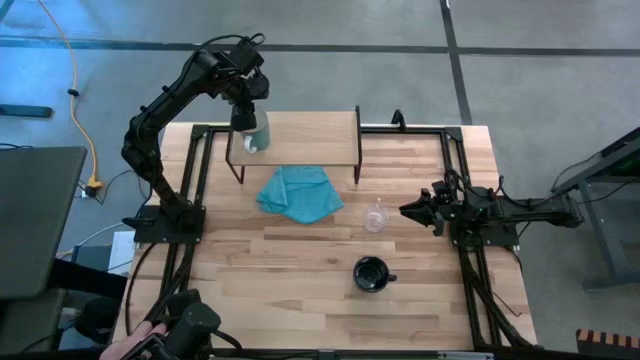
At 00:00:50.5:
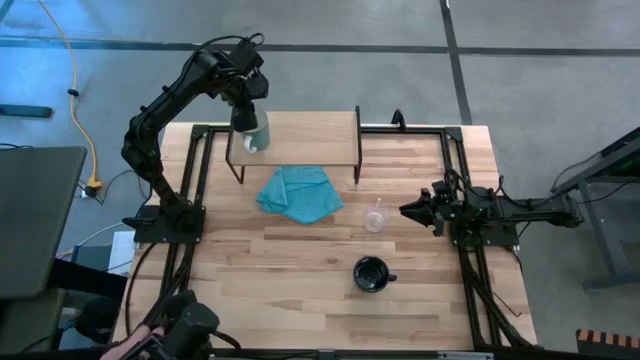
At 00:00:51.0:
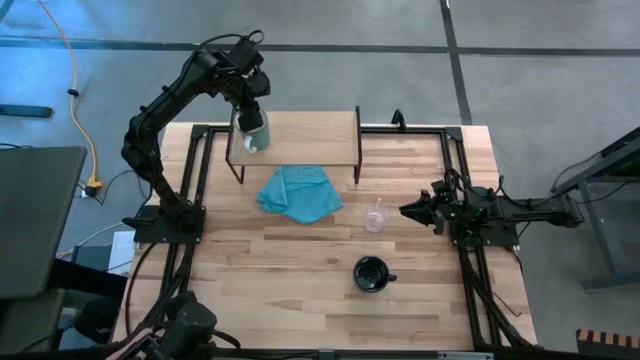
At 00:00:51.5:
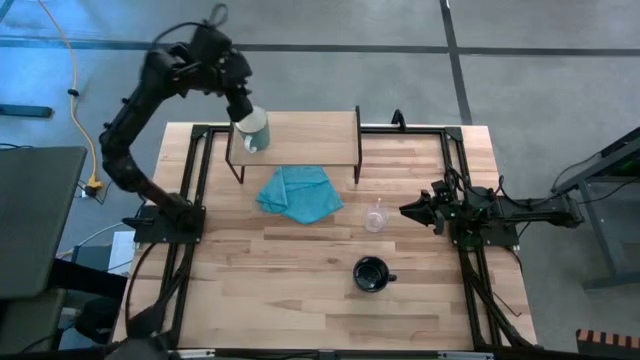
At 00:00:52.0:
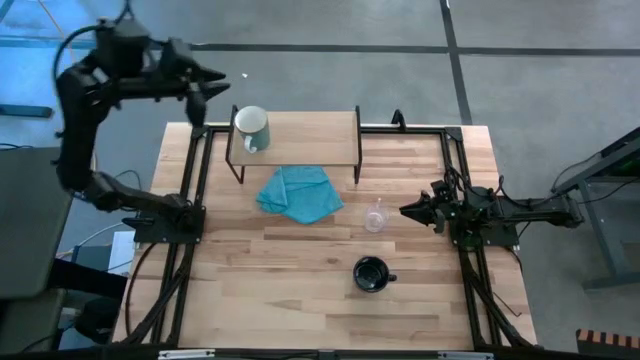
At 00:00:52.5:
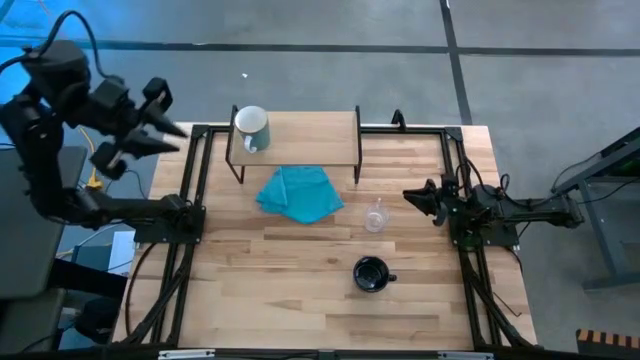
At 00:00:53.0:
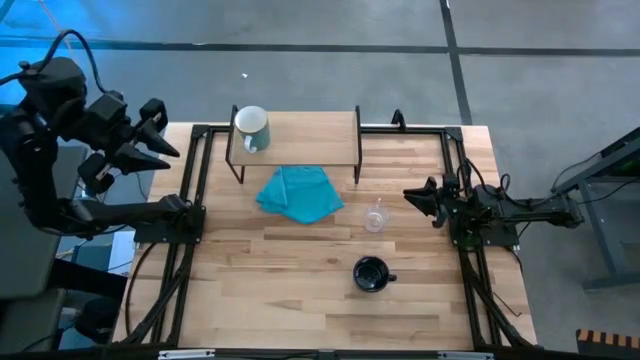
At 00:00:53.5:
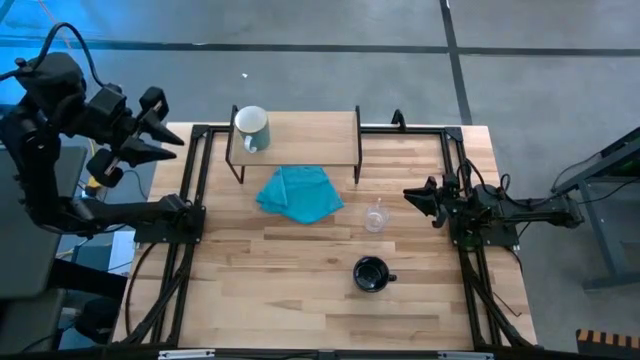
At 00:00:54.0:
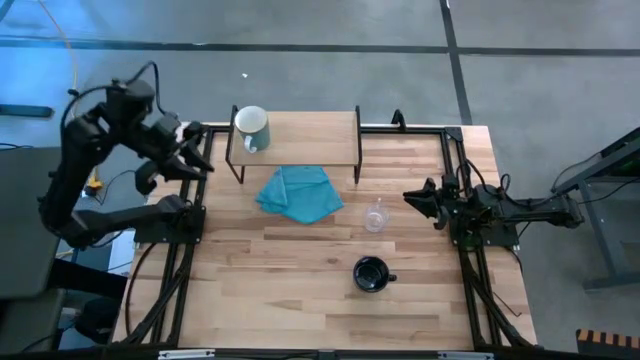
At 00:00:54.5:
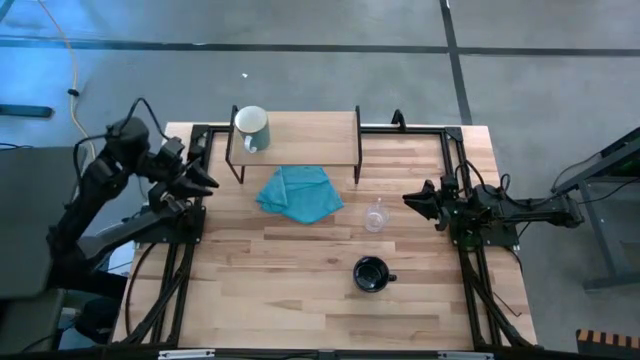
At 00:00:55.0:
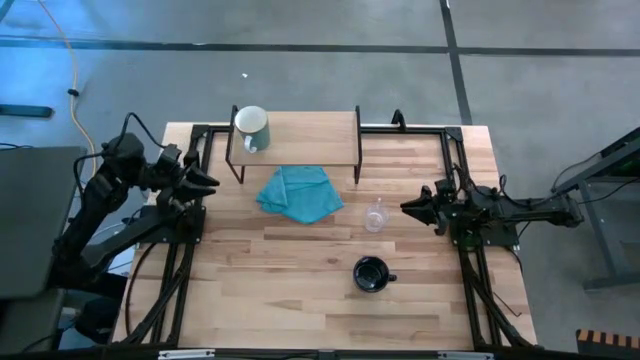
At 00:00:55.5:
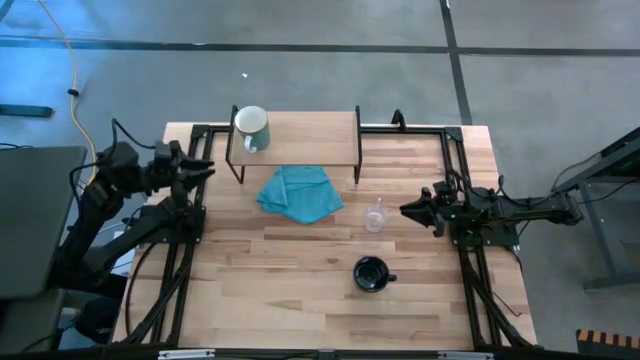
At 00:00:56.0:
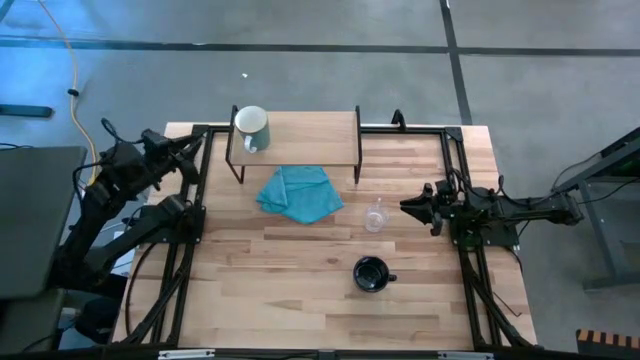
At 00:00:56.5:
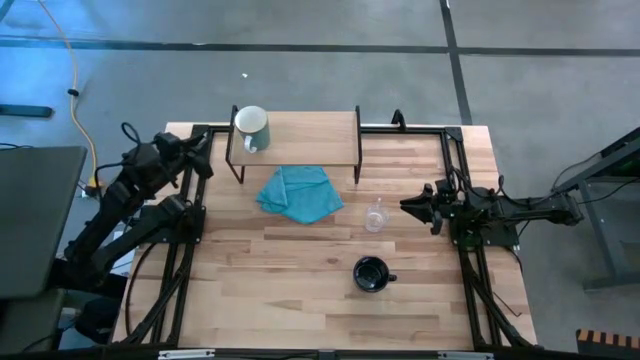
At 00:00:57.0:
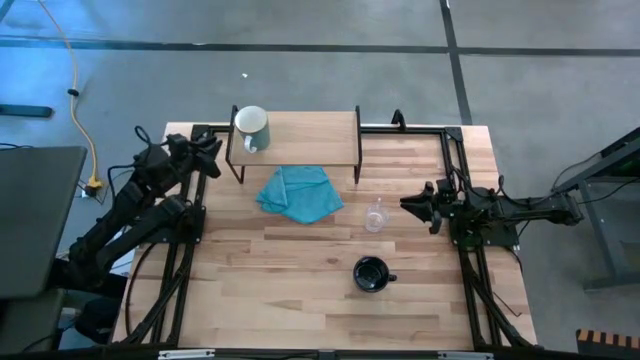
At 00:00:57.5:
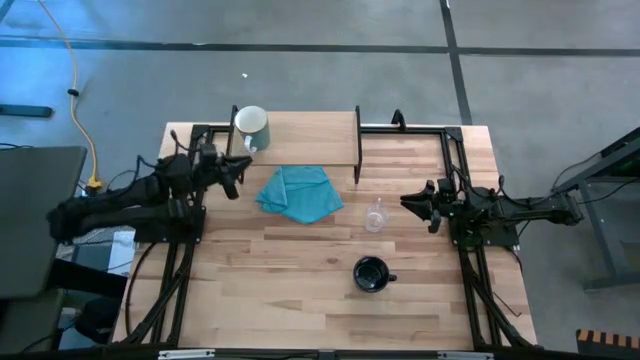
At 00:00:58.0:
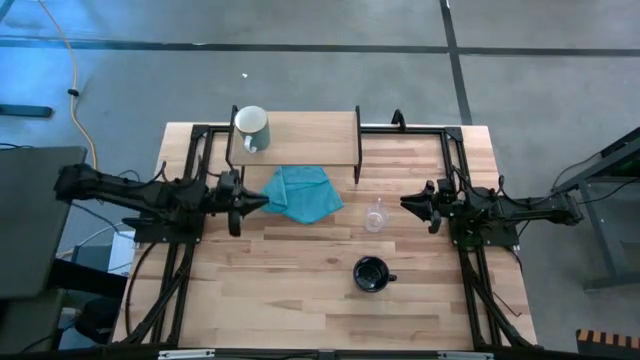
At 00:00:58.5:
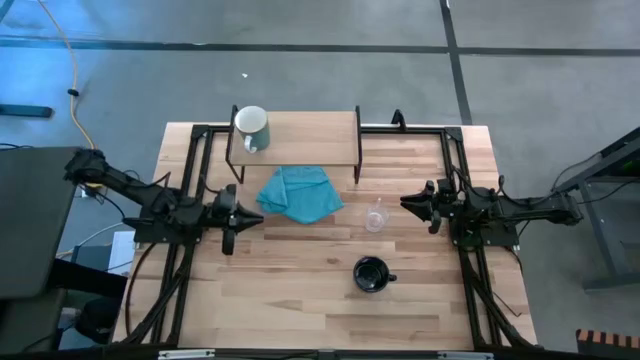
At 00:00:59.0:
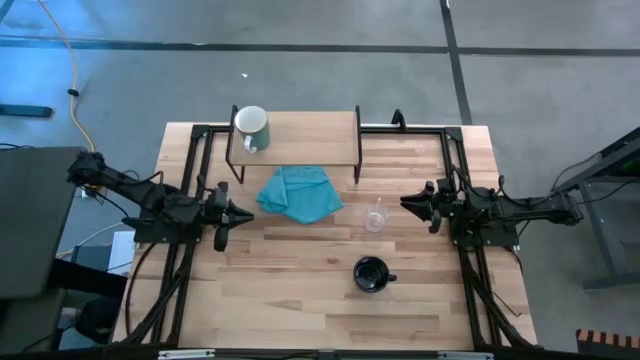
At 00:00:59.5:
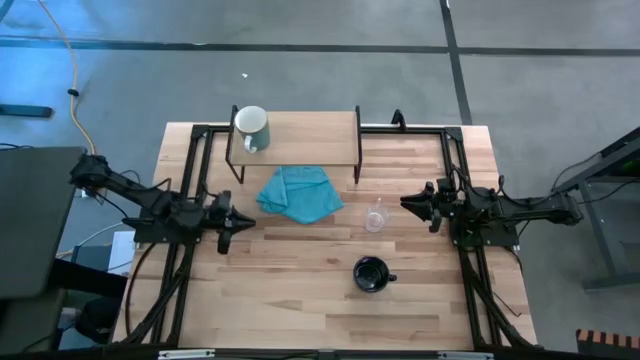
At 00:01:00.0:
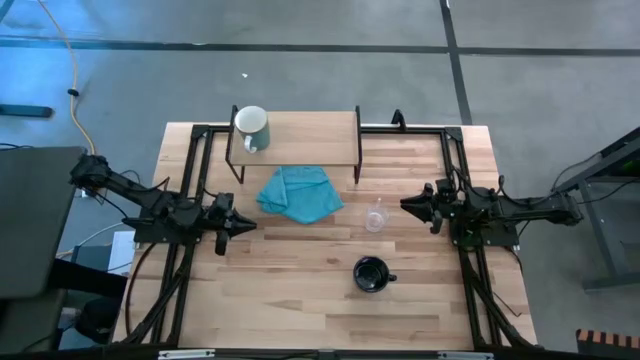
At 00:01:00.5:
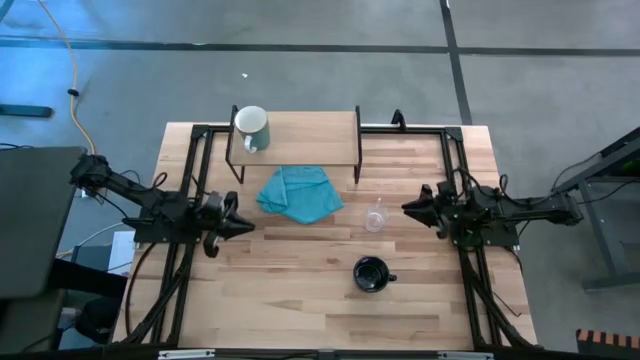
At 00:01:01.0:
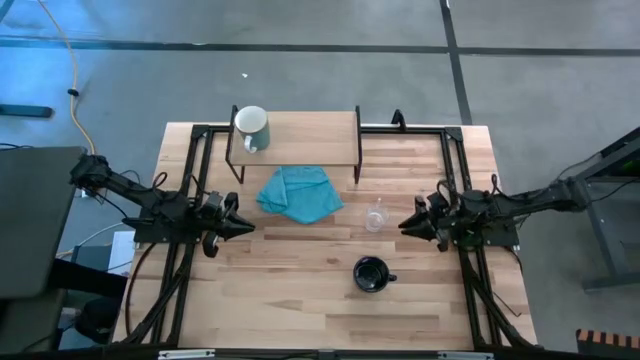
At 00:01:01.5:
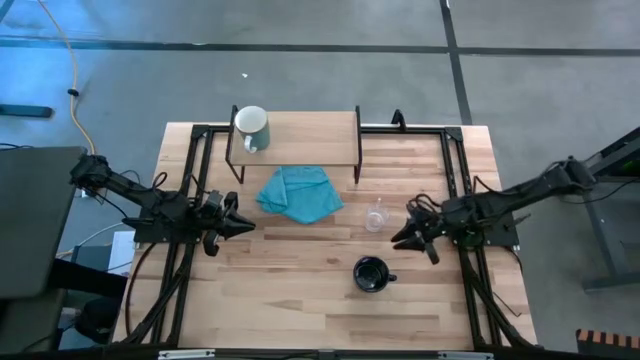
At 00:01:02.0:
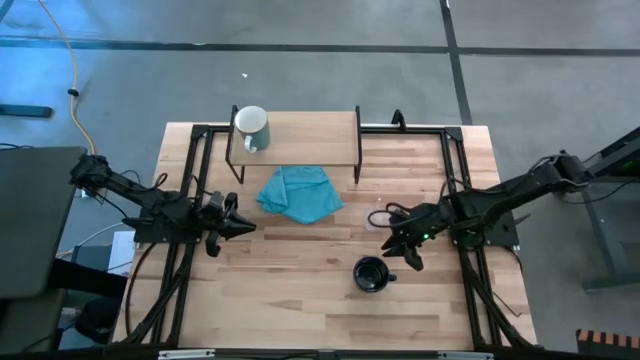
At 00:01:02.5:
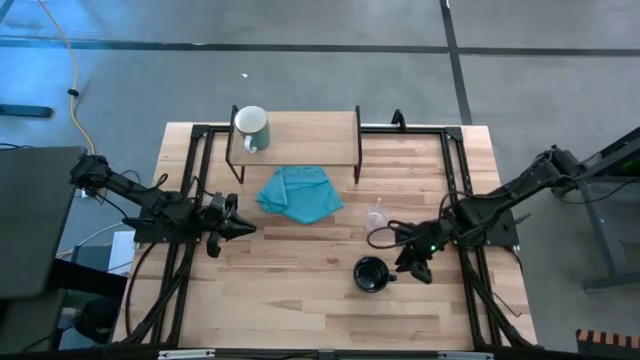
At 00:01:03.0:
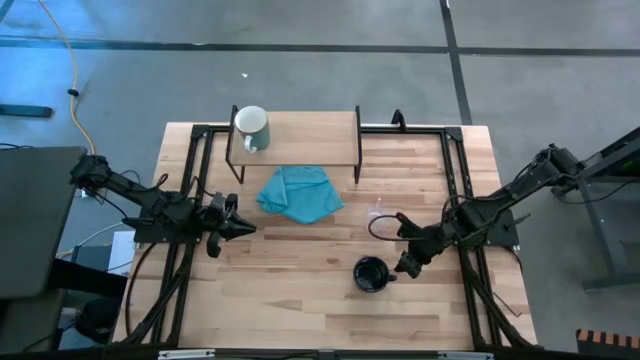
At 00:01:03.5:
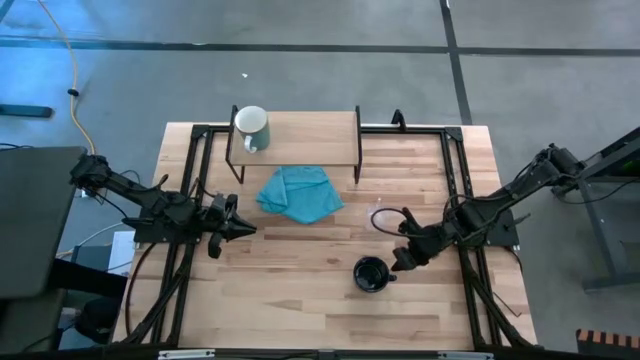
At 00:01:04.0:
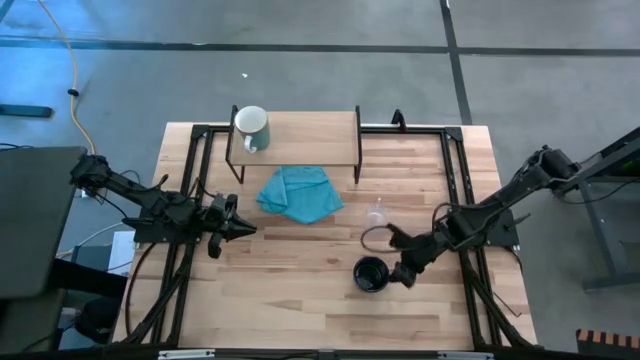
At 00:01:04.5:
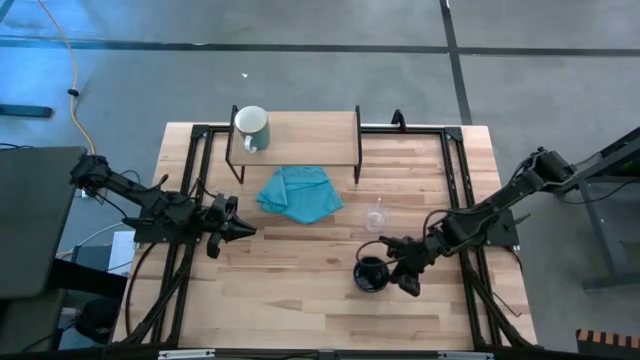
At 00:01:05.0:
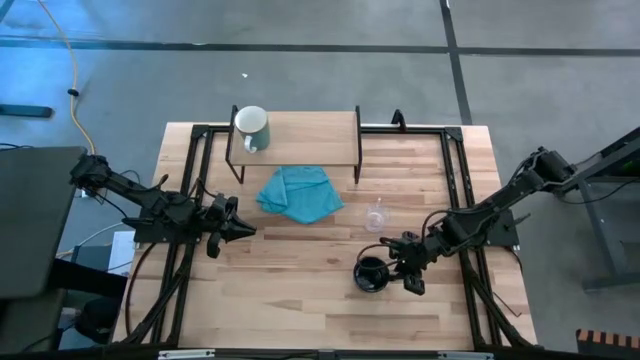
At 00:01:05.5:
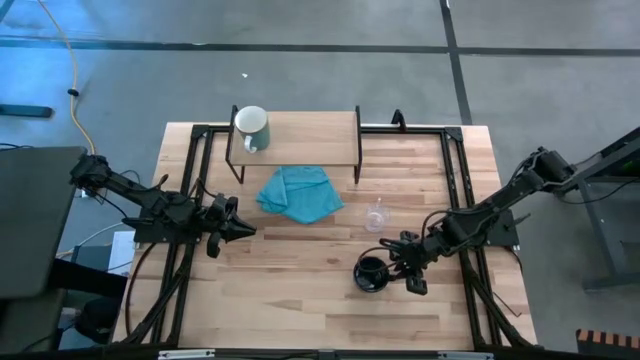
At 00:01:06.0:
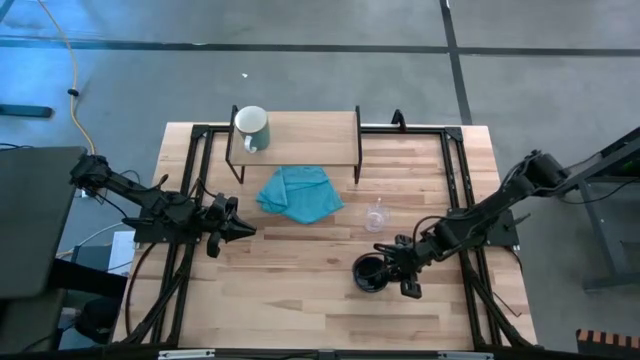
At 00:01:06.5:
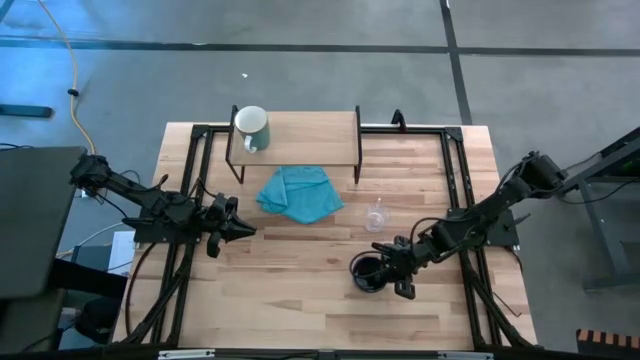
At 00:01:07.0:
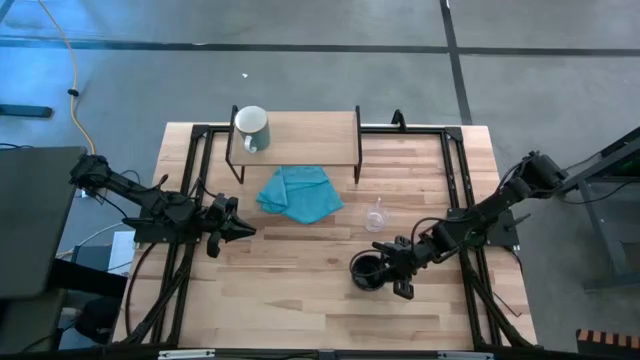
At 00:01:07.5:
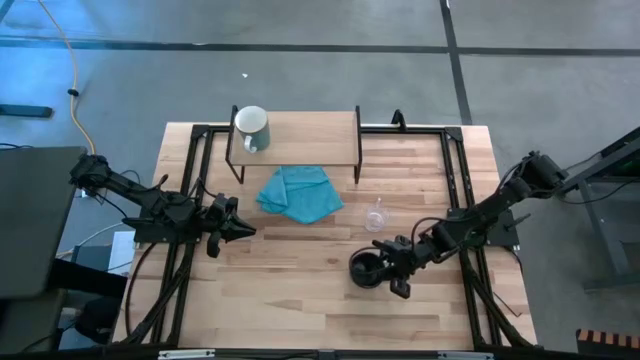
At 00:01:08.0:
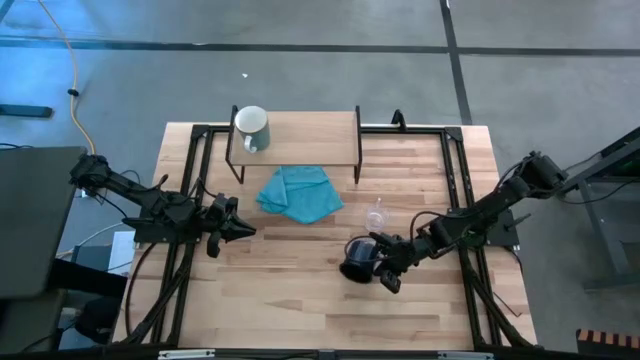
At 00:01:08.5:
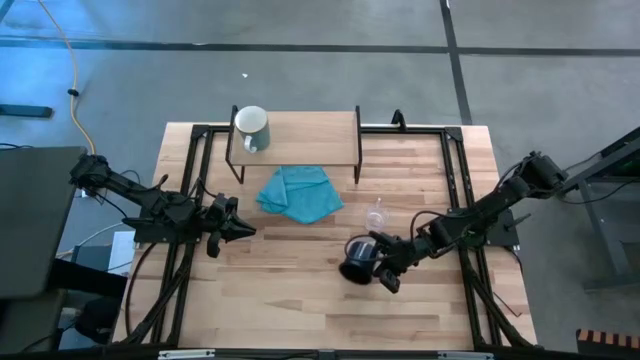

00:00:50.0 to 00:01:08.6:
Task: Stack small to large cups/mugs on shelf
Put the blue mug on the shelf

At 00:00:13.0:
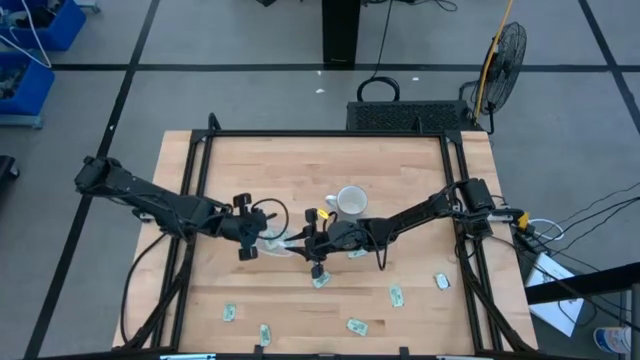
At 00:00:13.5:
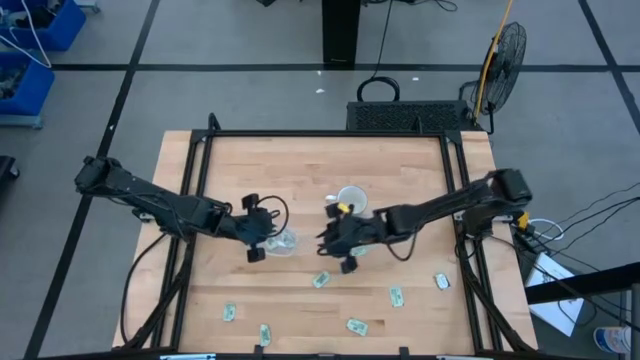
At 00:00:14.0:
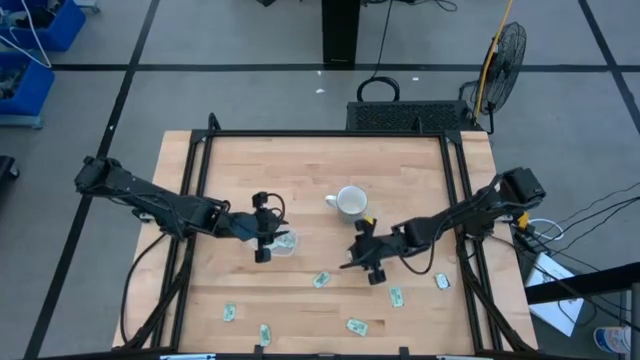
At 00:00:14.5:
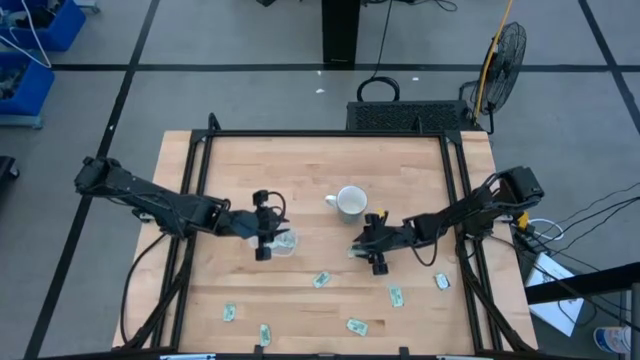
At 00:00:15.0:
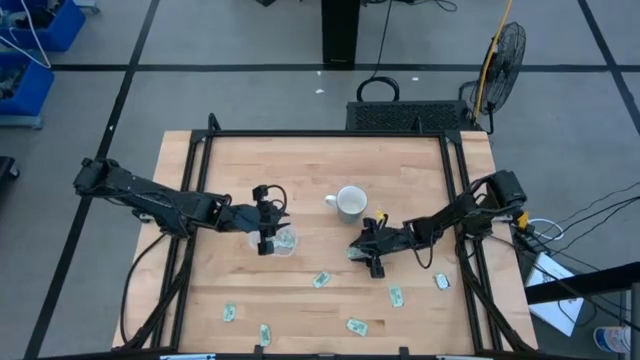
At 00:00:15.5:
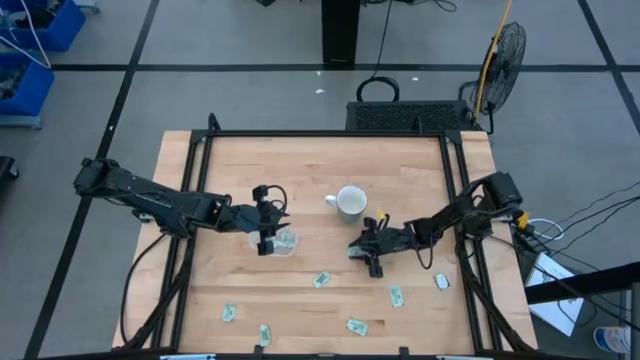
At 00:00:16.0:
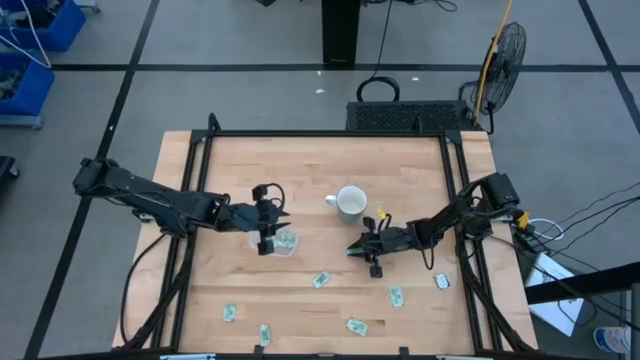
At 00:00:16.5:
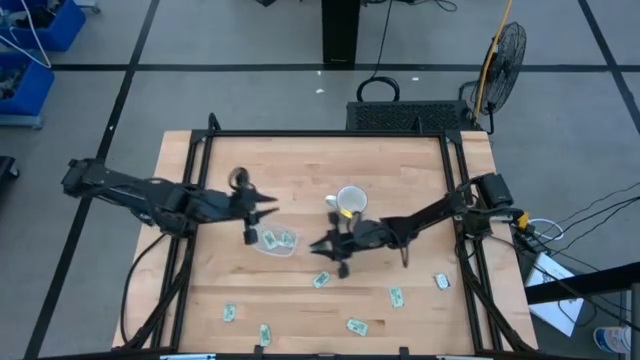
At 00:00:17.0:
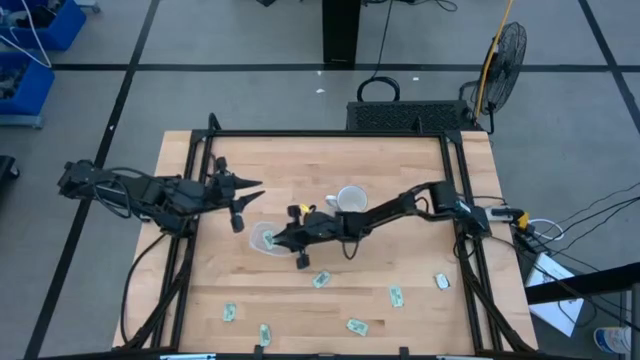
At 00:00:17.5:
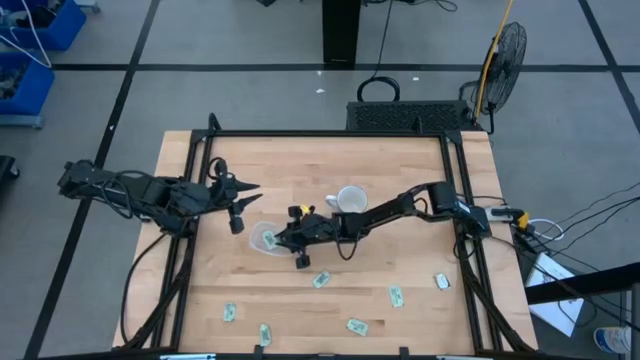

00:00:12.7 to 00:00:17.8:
Task: Pick and place Stevia / Truvia into bins
Put the green stevia packet into the transparent bin
